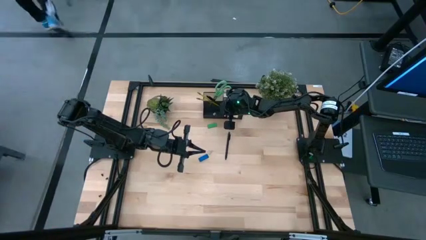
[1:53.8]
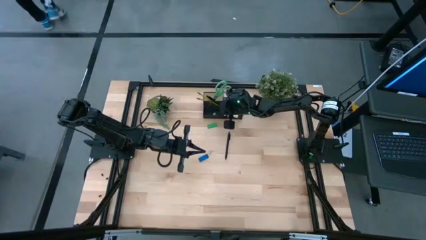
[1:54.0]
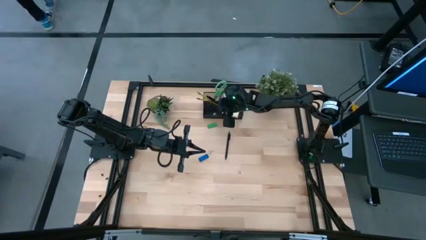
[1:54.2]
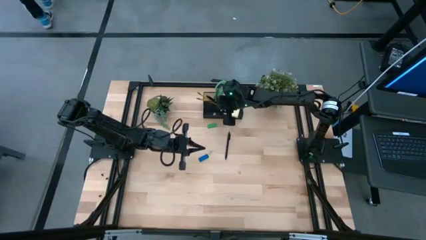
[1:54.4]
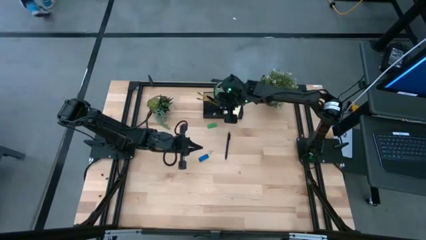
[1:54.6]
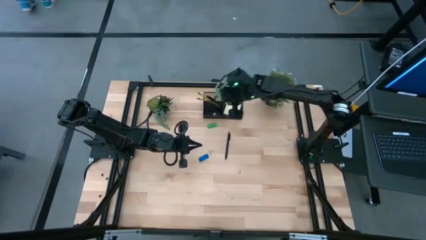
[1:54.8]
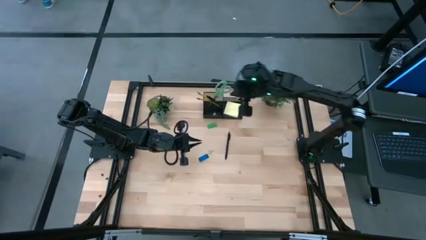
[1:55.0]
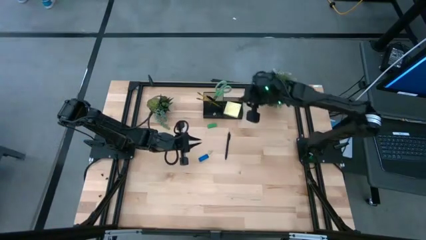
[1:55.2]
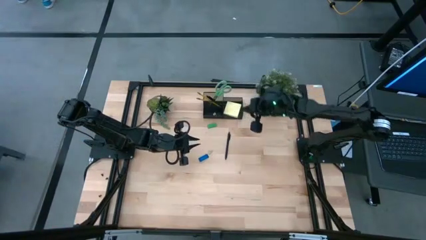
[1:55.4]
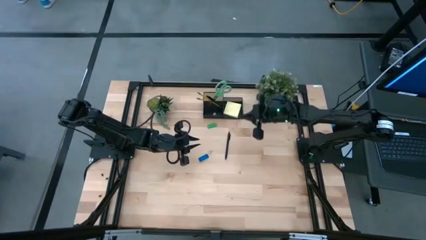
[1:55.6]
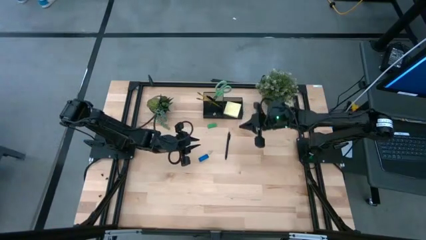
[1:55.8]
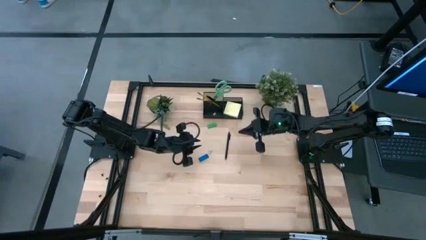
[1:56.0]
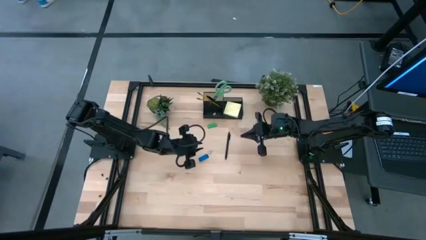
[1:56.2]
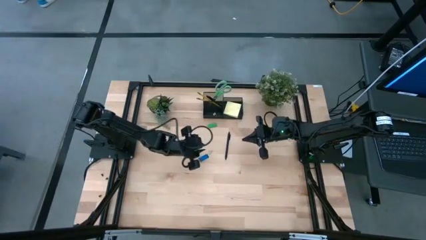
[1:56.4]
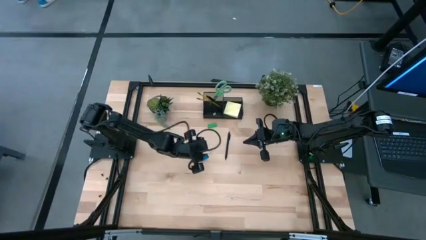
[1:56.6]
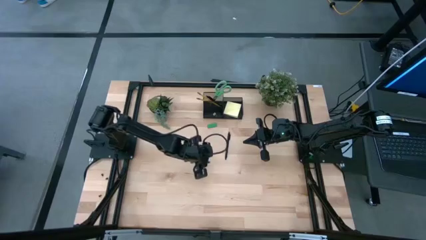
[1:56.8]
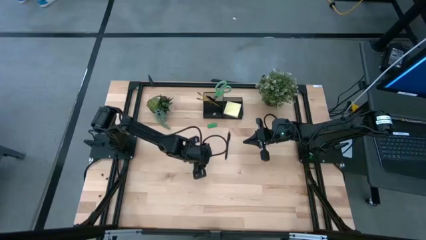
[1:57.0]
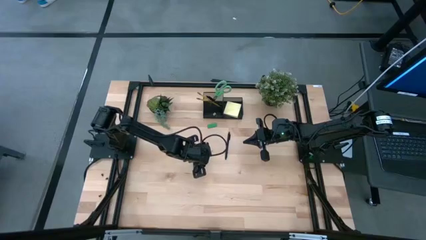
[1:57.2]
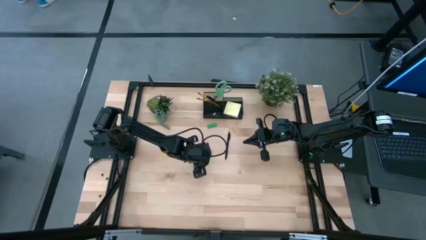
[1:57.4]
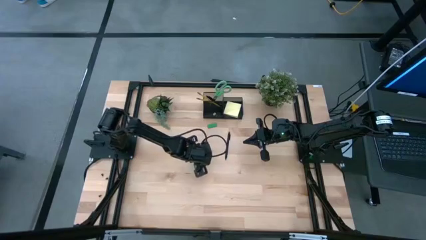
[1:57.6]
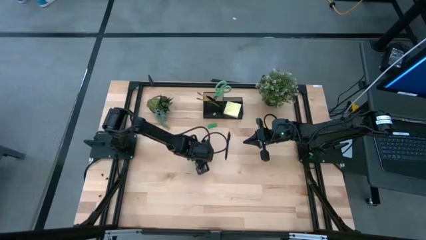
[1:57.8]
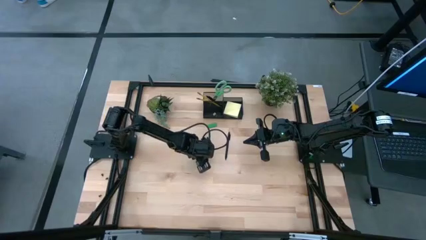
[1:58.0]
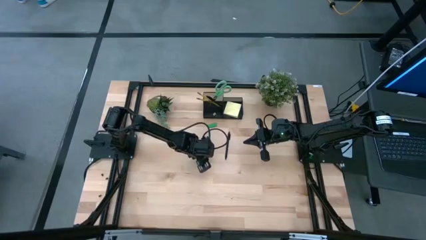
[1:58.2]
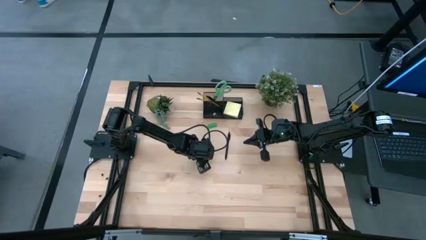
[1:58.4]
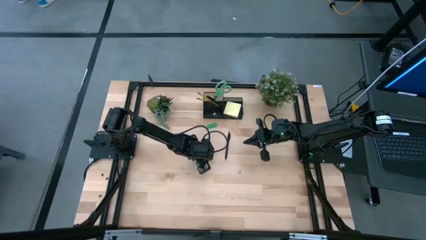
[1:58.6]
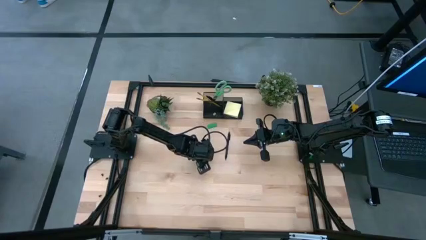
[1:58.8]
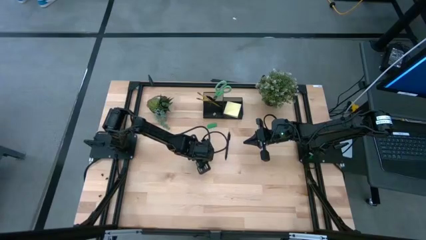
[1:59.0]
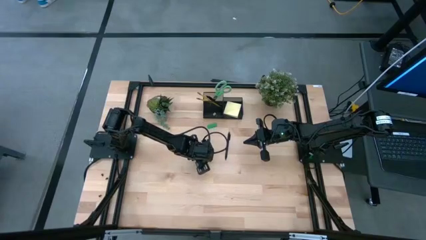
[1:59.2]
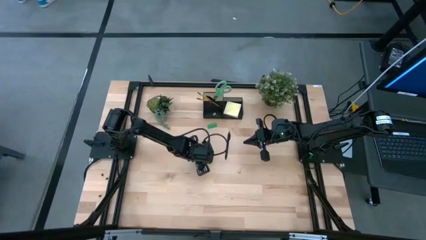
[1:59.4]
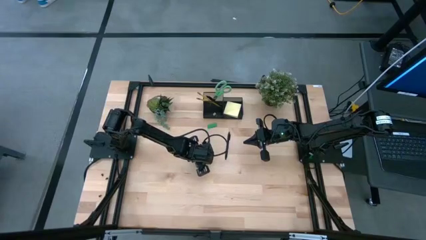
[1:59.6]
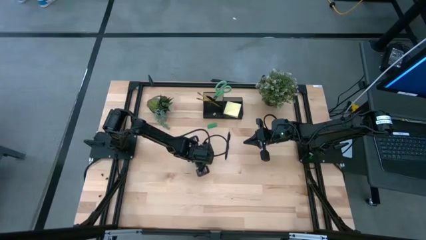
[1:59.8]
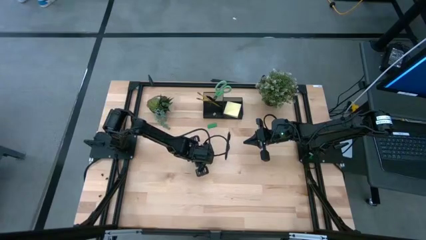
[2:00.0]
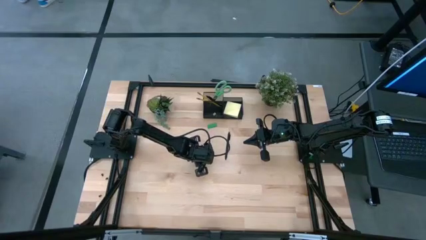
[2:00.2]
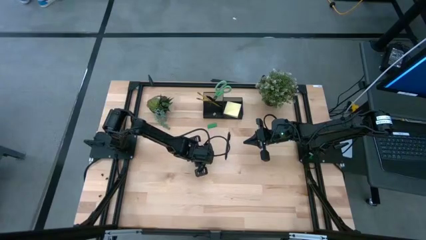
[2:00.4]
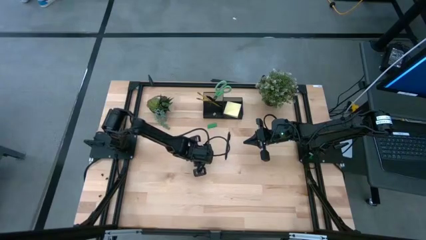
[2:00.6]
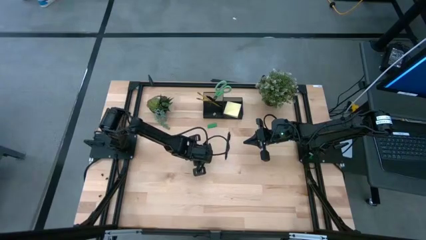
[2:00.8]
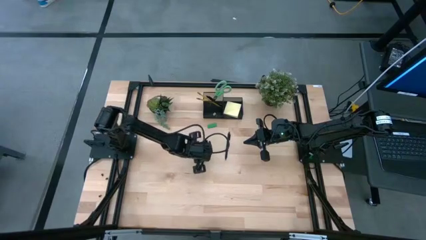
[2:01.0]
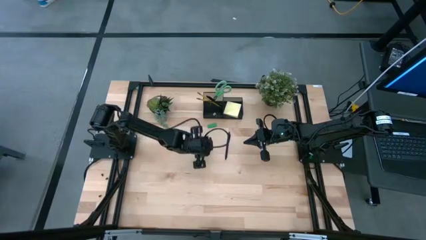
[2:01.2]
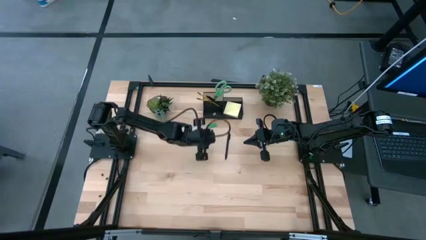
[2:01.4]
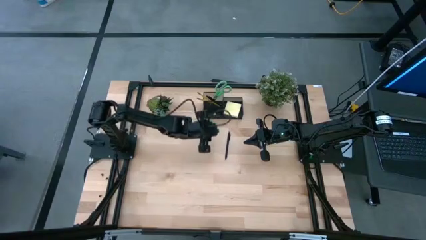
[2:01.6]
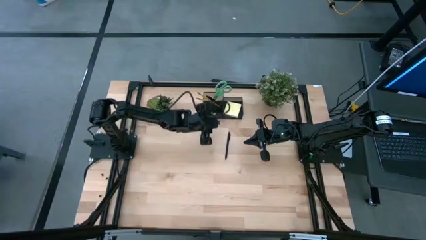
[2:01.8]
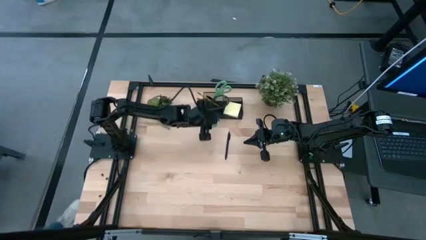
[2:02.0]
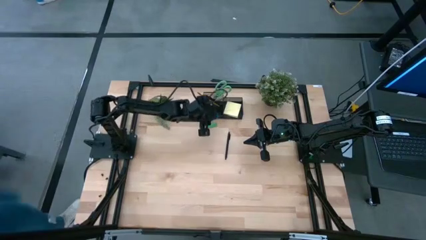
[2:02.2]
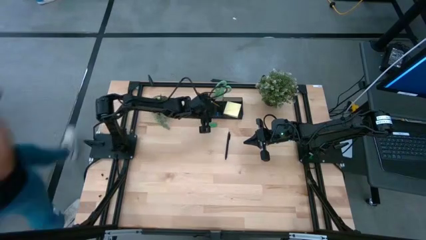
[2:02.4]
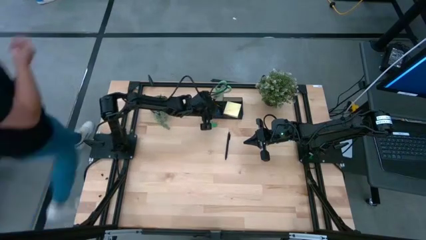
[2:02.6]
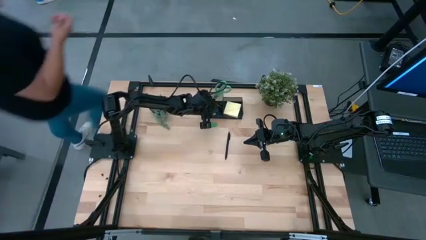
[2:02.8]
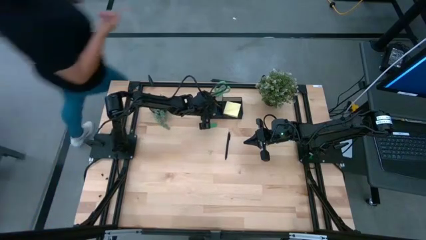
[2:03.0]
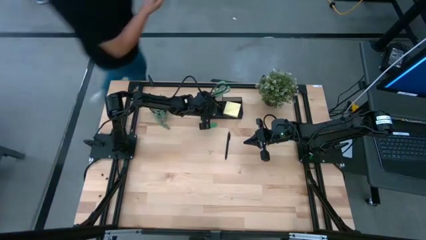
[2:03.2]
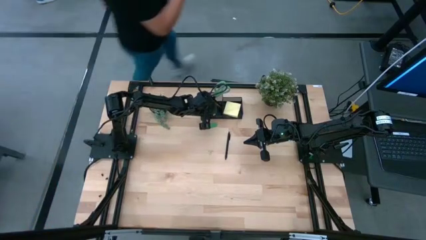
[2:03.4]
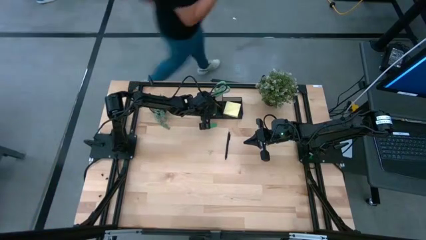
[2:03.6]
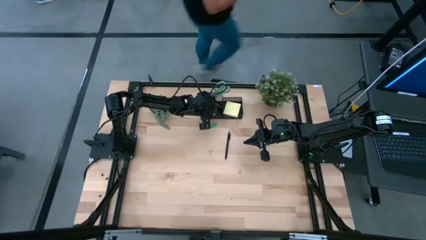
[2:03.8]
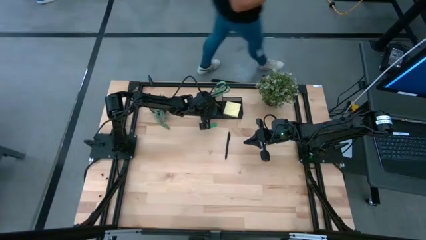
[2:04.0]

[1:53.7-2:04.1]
Task: Pick and place office supplies into organizer
Put the blue eraser into the black desk organizer

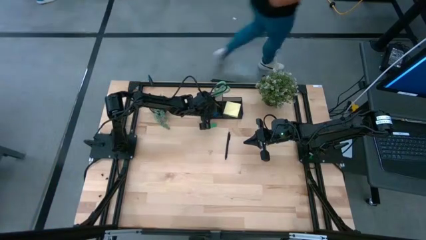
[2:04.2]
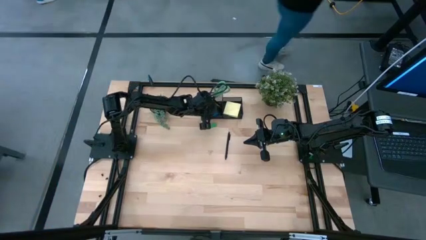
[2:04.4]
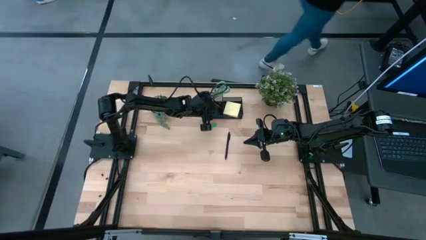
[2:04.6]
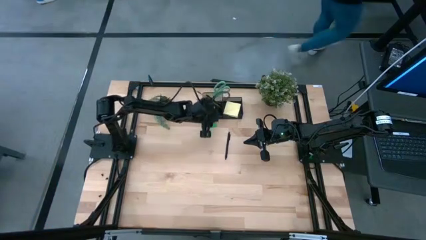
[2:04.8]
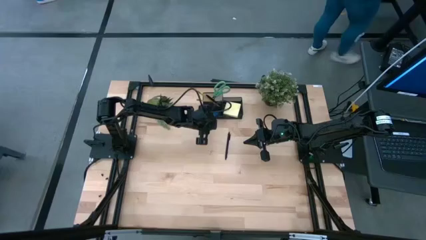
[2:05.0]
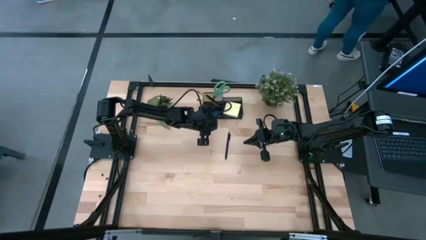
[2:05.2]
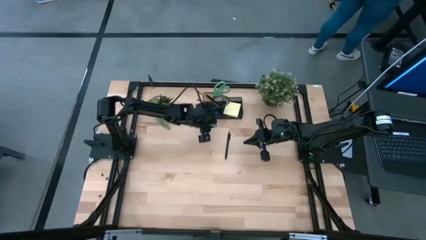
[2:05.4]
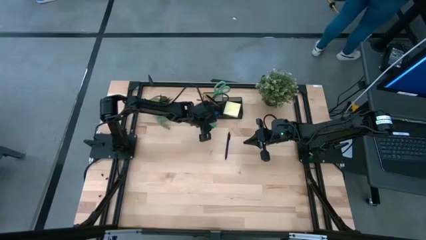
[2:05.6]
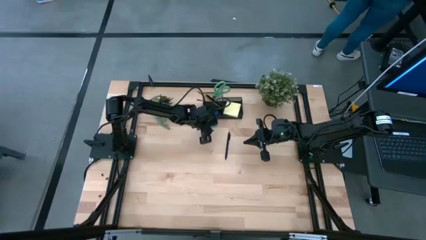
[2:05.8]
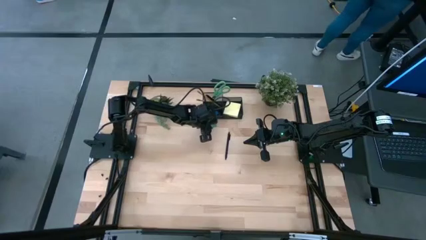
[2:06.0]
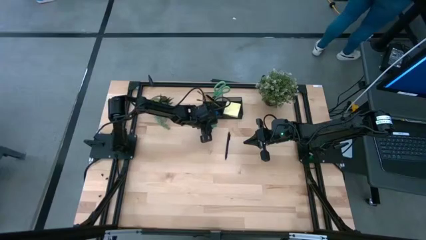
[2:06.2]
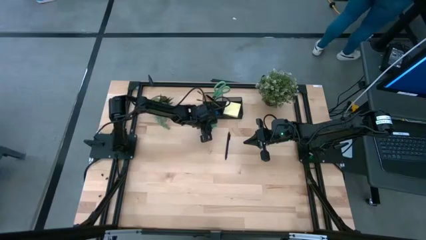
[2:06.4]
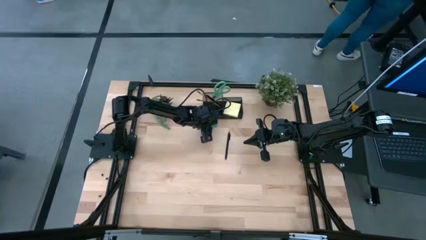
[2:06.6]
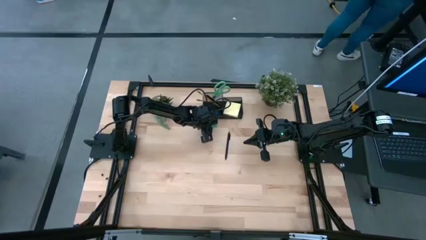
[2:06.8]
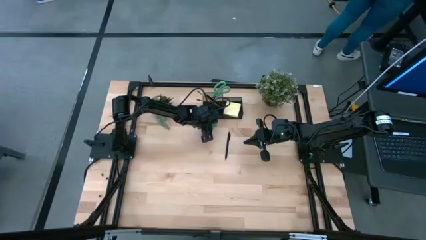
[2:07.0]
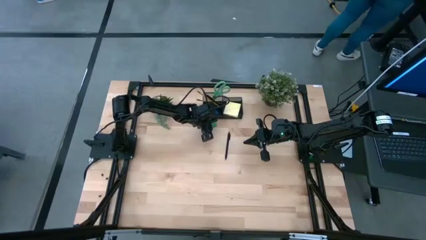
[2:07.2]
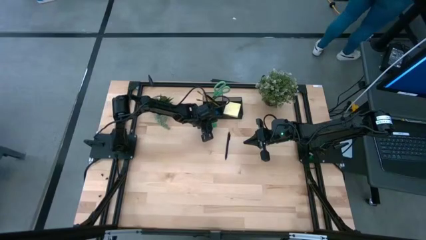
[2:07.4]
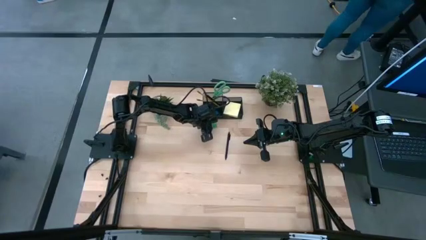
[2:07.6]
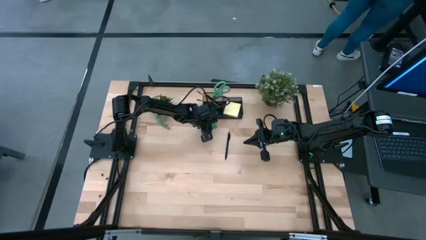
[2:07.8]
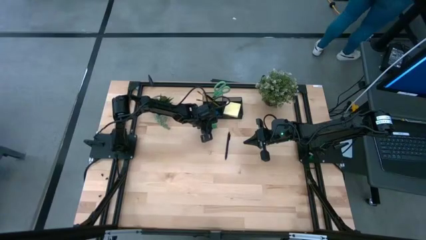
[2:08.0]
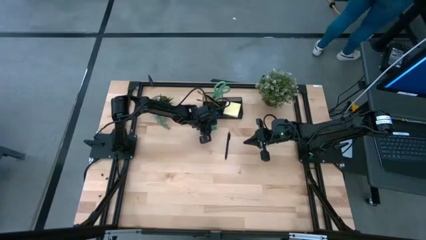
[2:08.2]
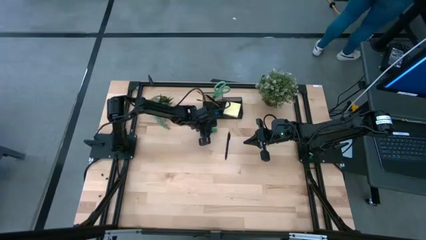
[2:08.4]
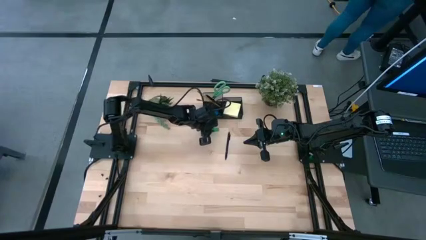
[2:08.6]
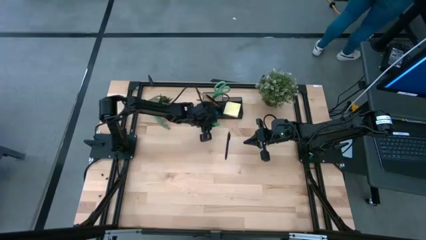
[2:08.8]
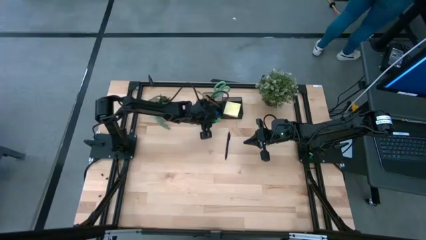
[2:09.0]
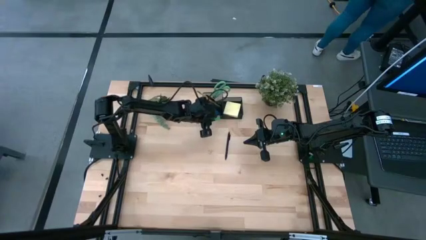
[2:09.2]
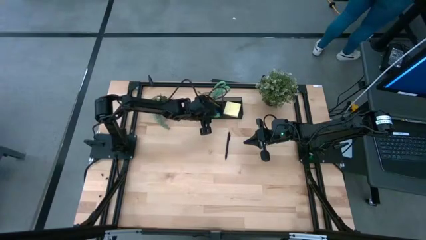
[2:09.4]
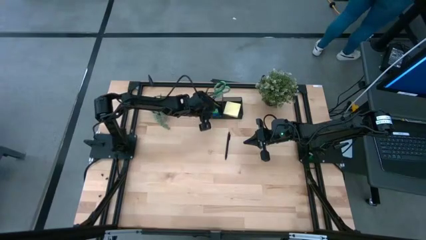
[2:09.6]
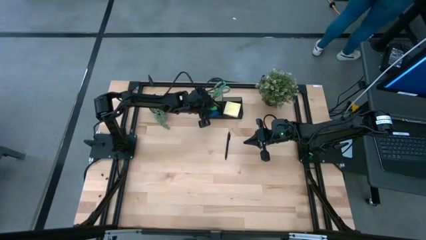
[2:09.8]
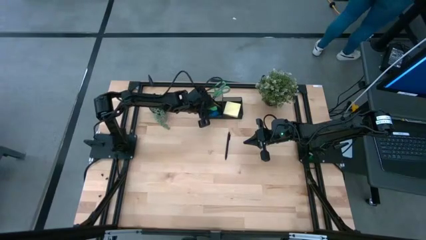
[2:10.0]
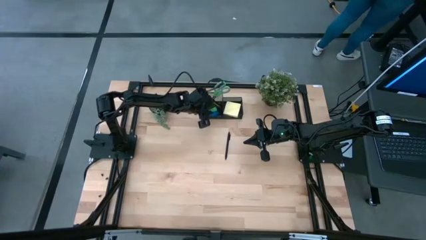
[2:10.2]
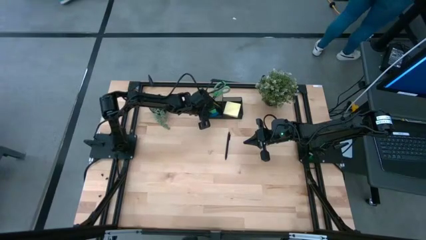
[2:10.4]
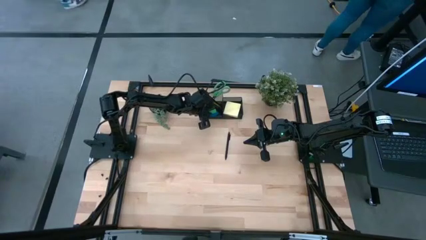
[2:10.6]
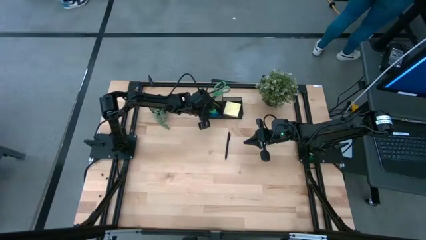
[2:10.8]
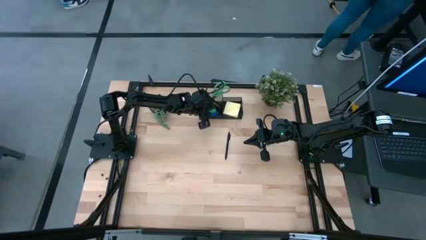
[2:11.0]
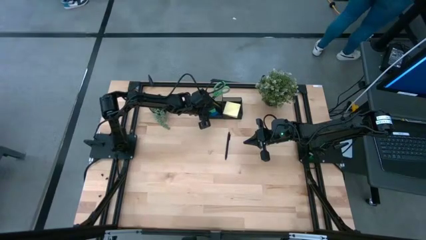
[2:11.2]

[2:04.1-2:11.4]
Put the green eraser into the black desk organizer
